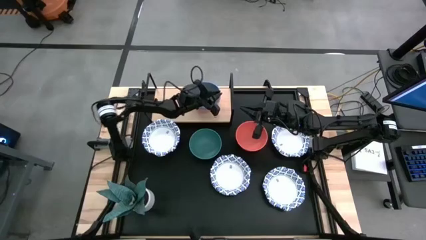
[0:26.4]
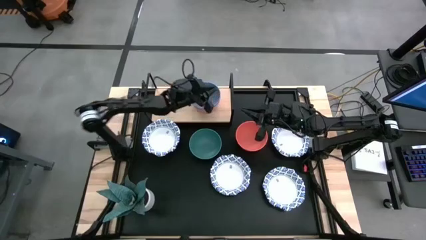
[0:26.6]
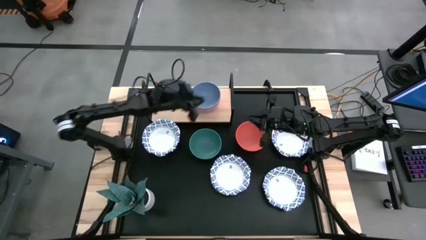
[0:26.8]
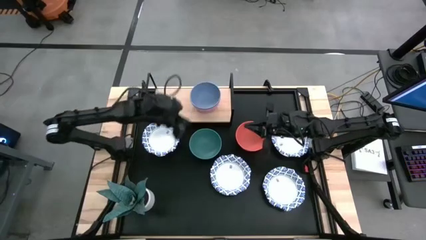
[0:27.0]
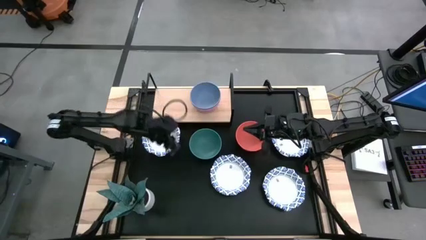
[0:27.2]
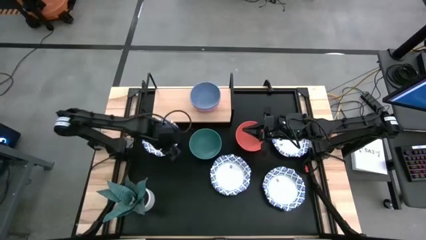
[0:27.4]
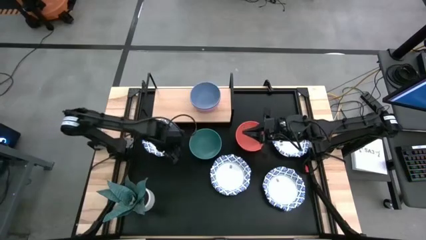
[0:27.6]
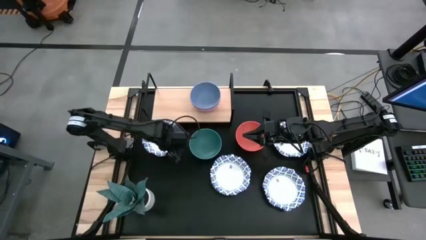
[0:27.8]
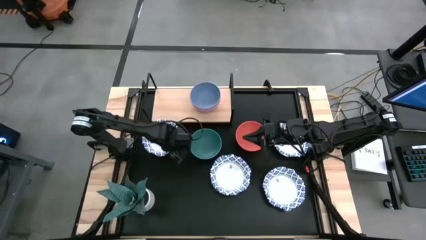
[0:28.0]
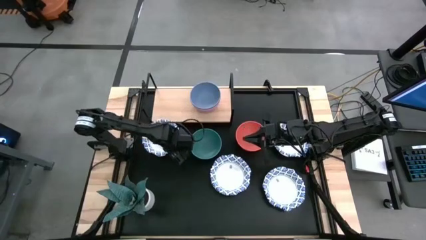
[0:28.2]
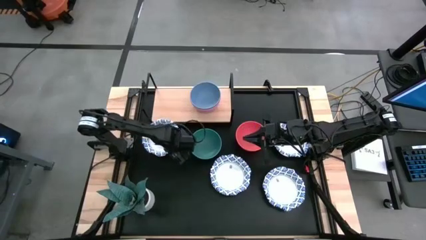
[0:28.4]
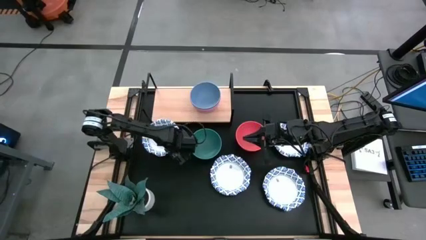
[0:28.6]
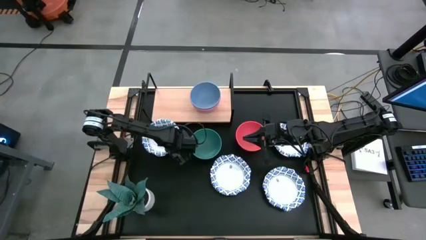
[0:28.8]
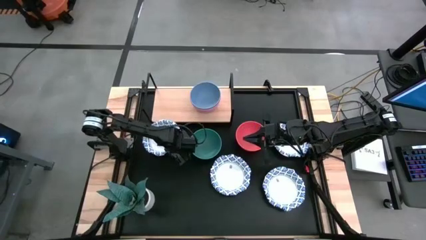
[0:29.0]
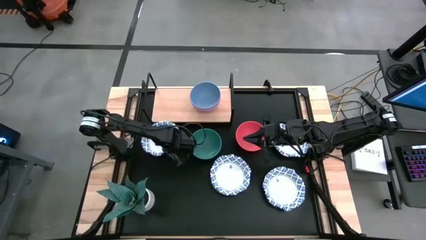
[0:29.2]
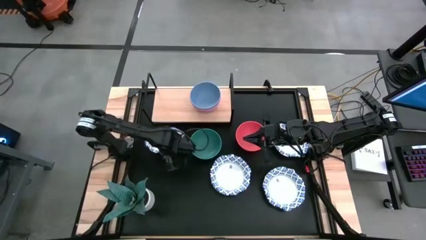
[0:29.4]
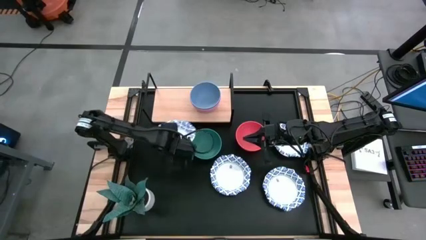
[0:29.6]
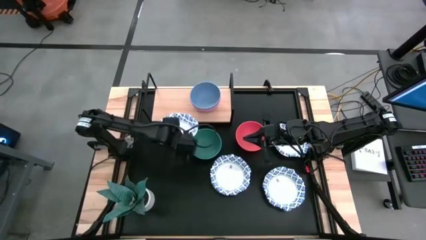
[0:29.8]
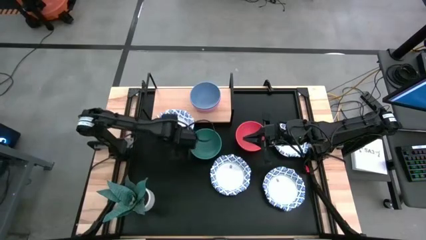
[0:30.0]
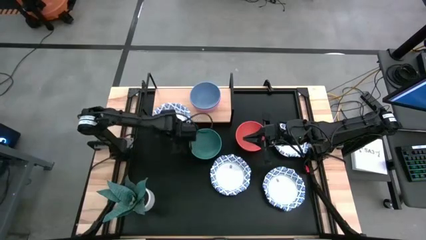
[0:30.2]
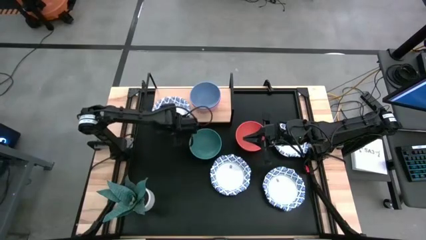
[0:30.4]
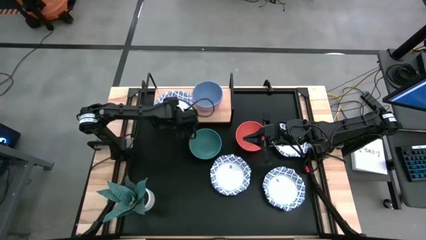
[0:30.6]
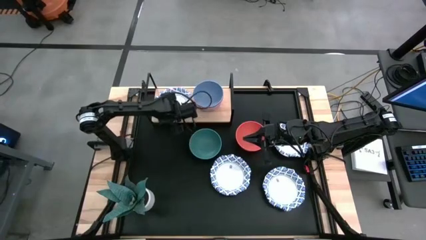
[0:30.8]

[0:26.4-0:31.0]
Task: Place and stack bowls onto a shelf
Put the white patterned bowl on the shelf

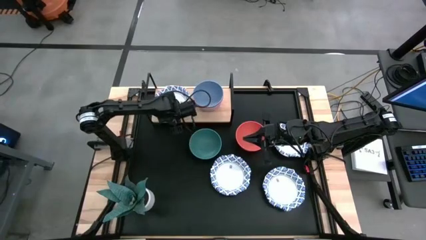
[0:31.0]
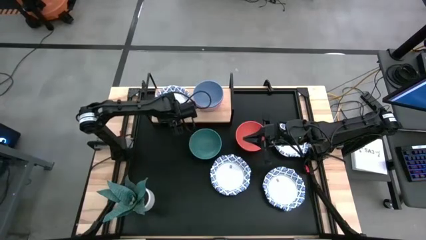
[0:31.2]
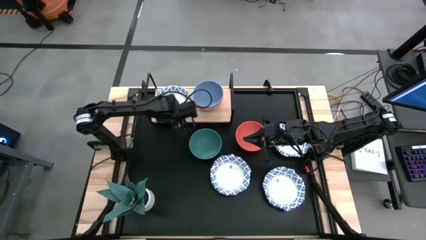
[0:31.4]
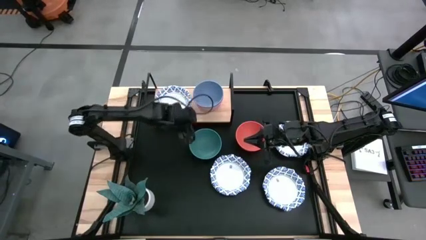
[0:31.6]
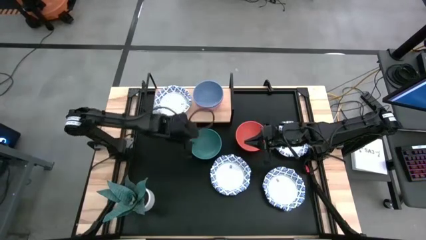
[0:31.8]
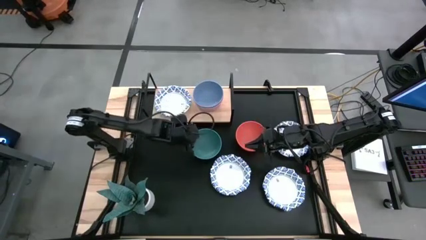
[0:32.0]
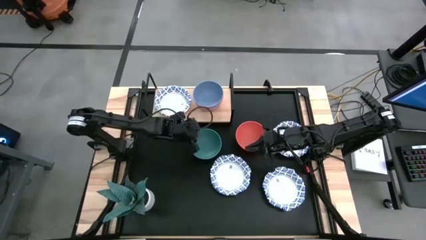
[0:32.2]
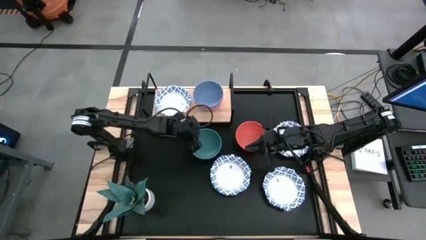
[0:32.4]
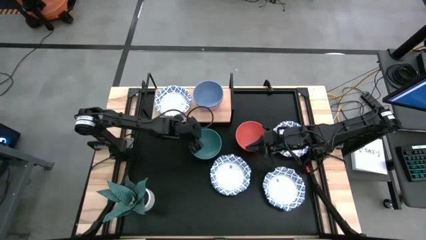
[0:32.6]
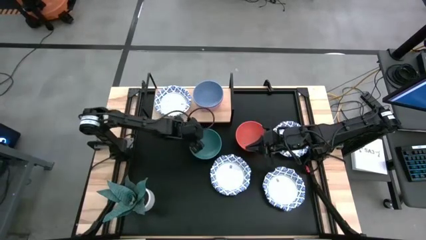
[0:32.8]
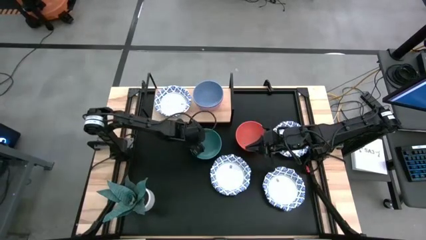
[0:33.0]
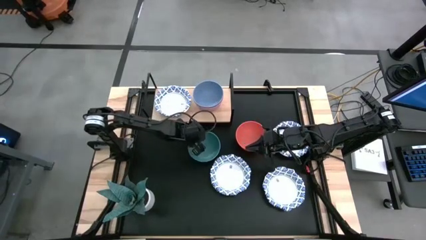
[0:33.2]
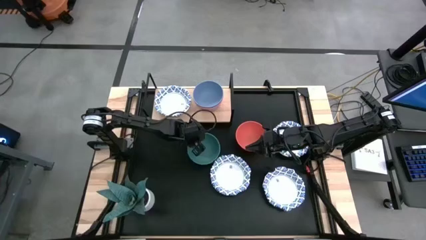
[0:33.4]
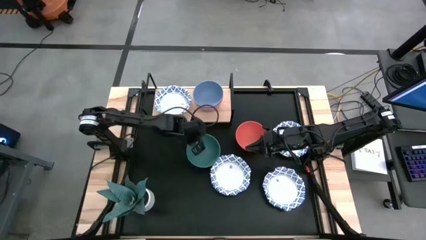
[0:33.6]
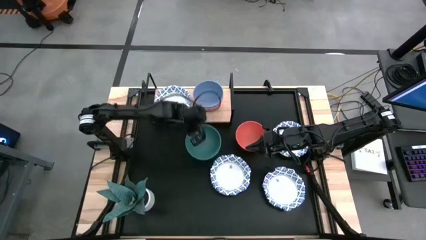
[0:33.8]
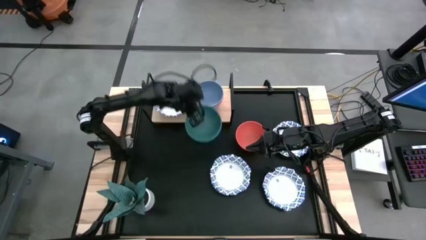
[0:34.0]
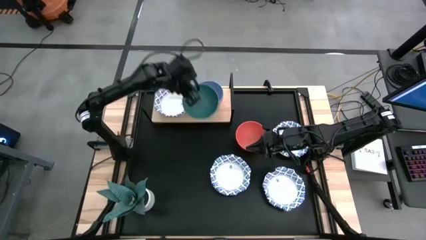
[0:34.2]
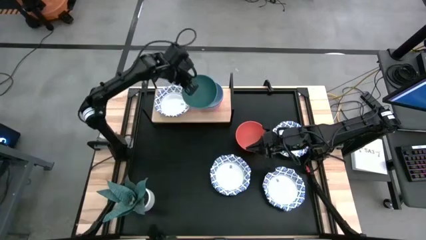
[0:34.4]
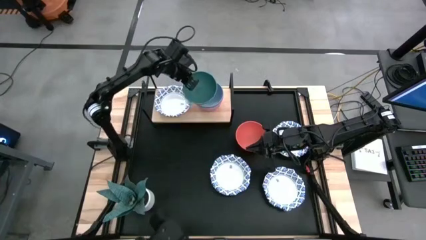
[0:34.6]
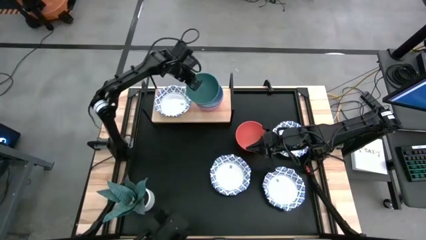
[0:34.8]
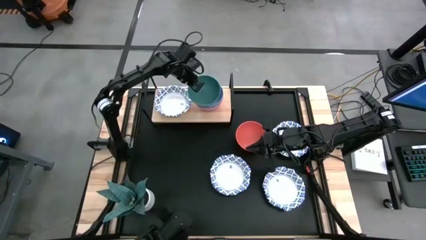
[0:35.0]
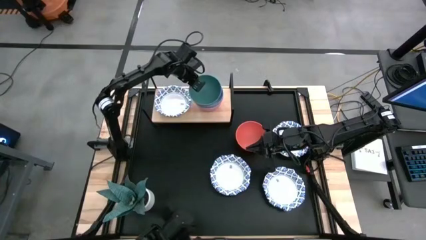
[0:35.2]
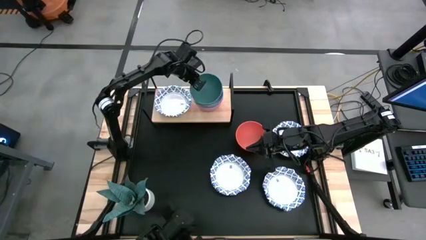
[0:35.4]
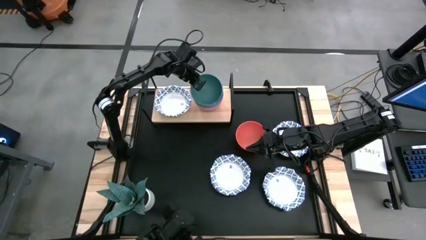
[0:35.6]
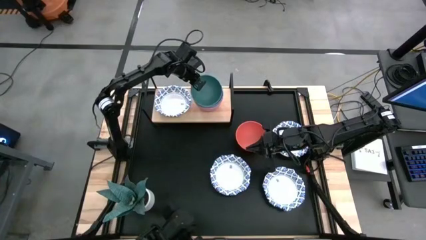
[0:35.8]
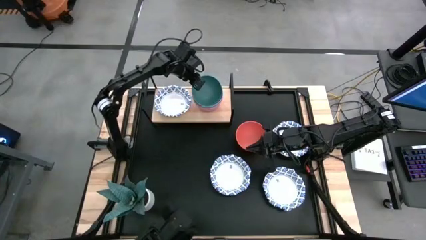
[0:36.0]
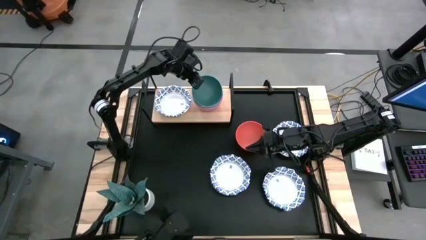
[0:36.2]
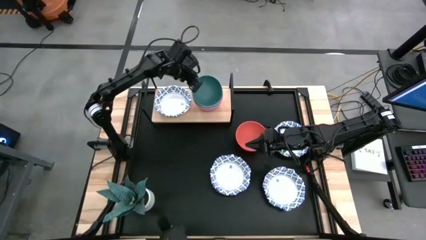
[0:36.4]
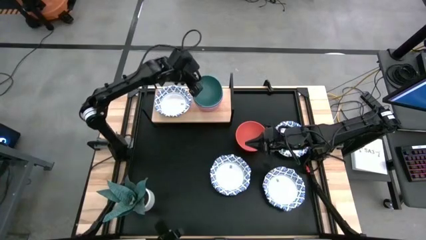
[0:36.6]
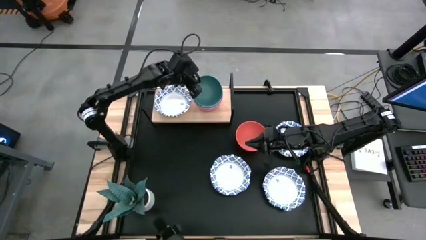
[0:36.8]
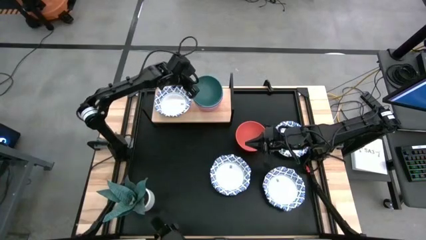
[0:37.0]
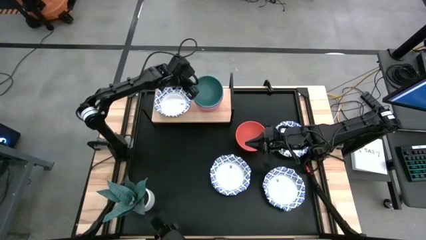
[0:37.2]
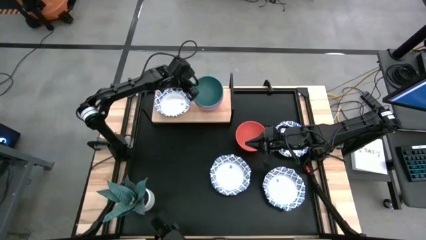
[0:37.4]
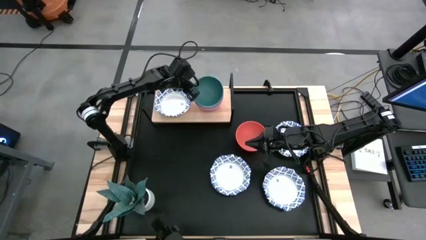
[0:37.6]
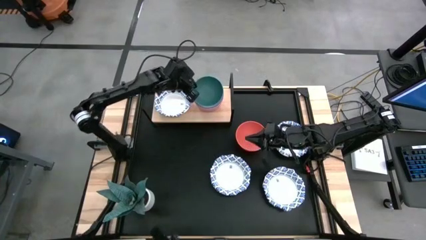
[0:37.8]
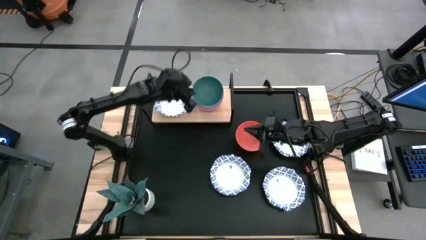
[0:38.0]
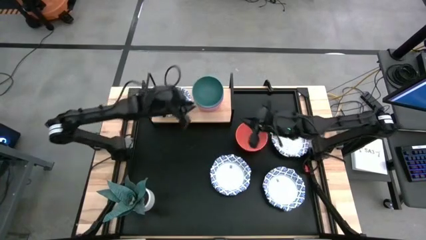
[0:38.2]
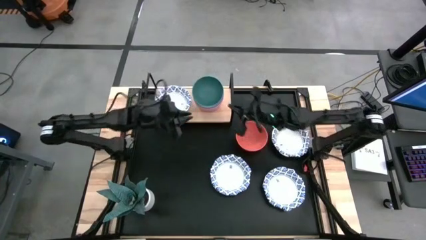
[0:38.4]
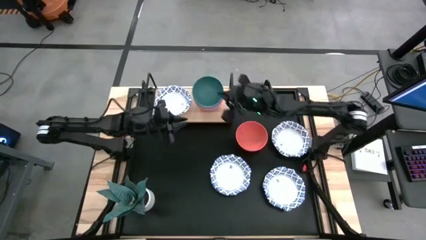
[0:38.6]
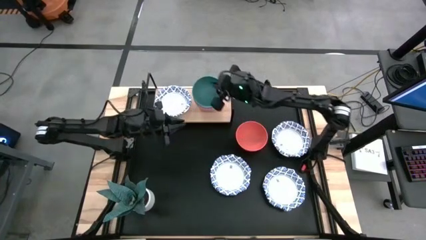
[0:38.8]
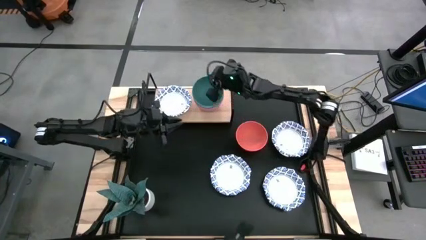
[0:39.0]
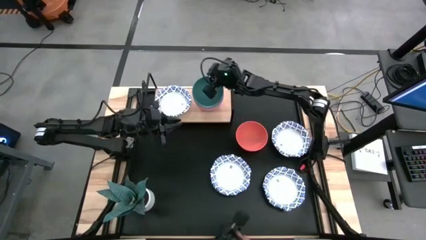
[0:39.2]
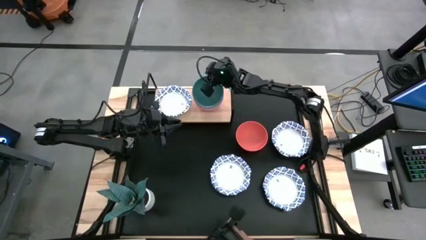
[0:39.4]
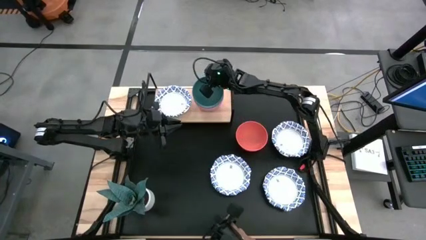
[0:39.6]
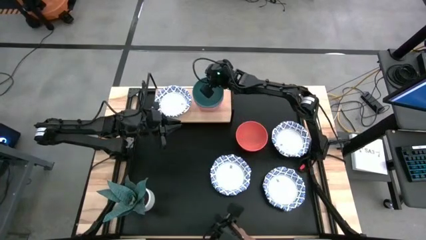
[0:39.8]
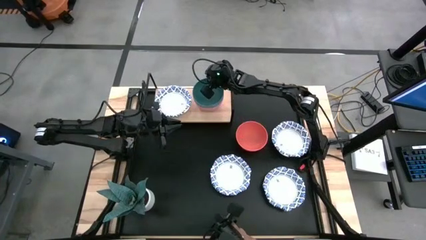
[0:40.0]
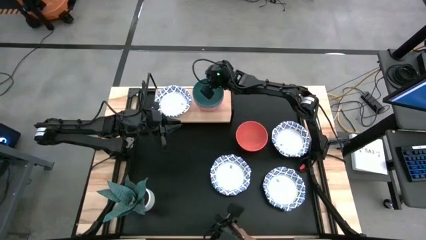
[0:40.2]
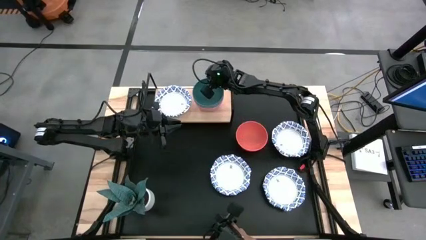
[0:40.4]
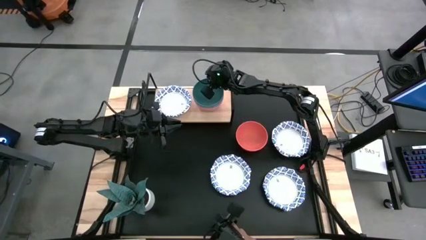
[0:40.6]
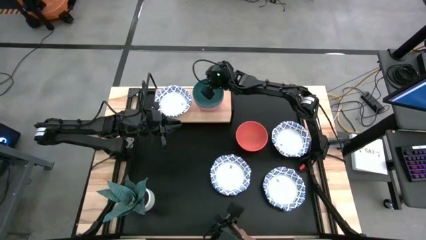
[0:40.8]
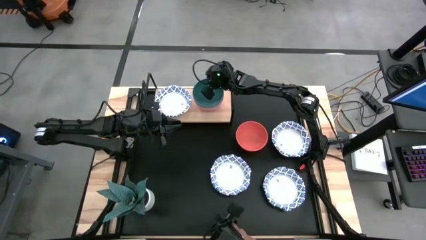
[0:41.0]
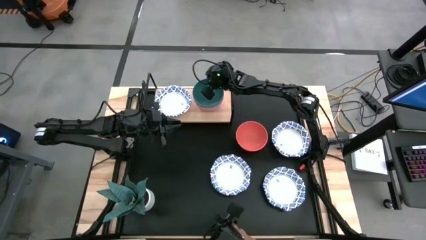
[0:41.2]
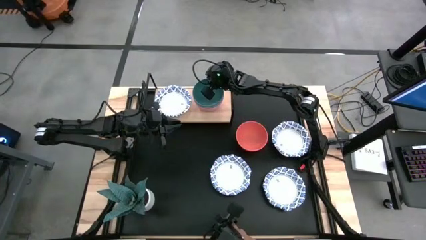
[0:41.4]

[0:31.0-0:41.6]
Stack the green bowl on top of the blue bowl

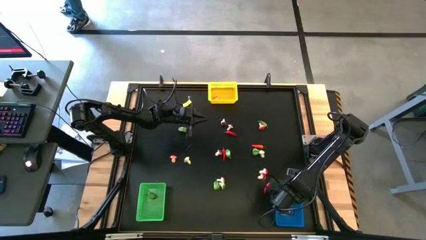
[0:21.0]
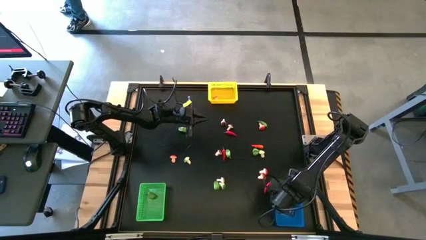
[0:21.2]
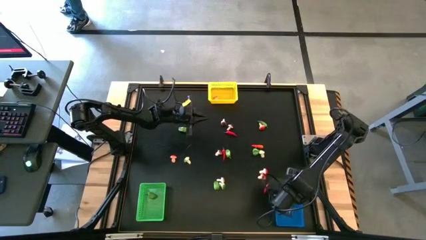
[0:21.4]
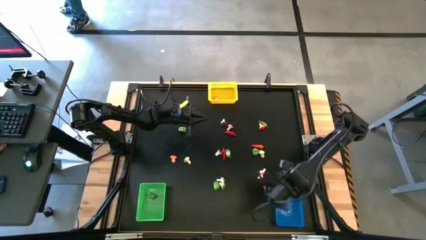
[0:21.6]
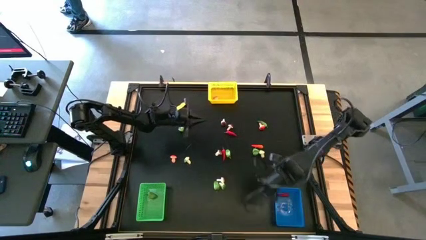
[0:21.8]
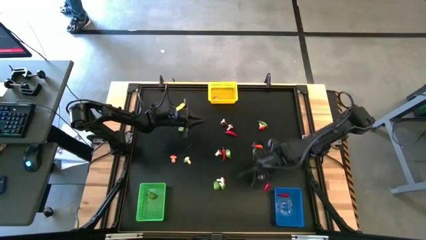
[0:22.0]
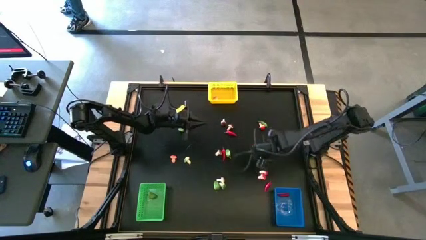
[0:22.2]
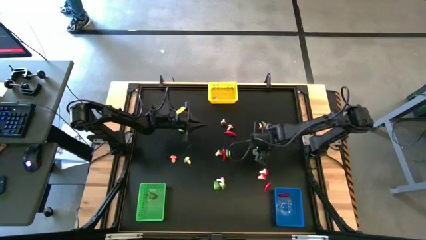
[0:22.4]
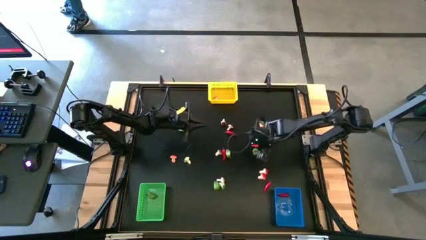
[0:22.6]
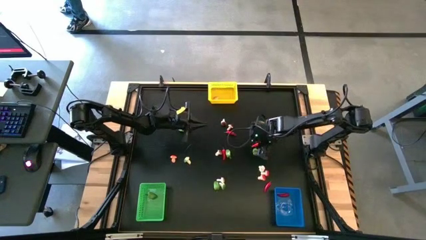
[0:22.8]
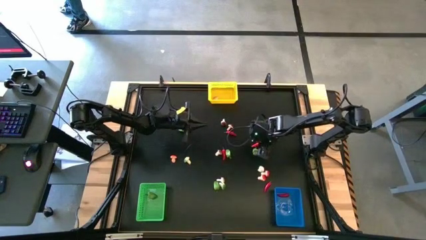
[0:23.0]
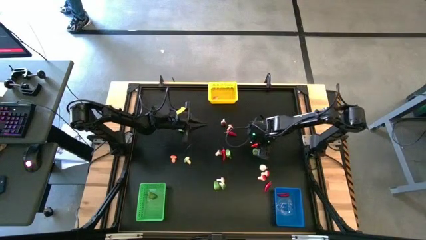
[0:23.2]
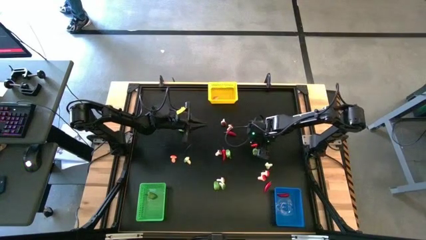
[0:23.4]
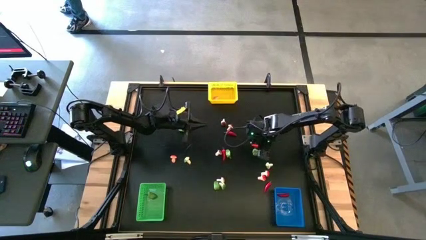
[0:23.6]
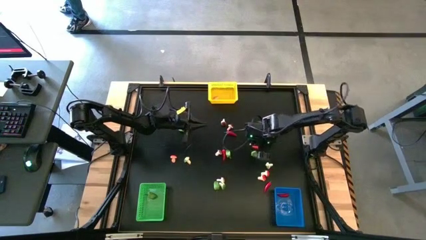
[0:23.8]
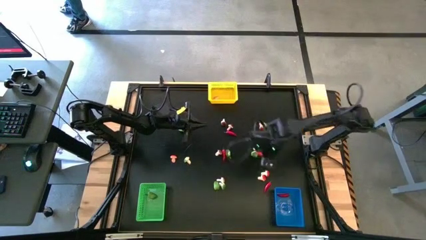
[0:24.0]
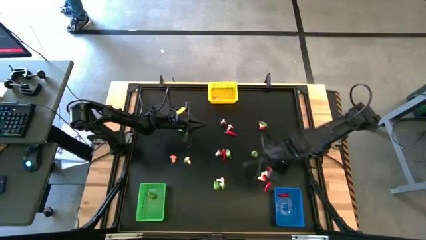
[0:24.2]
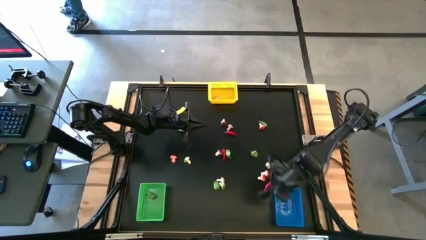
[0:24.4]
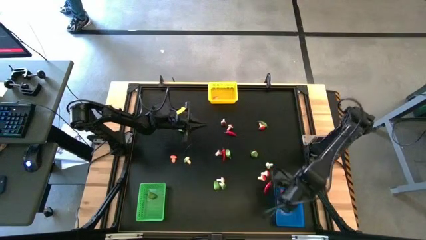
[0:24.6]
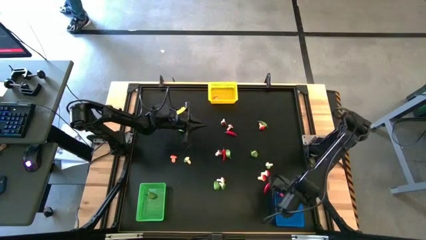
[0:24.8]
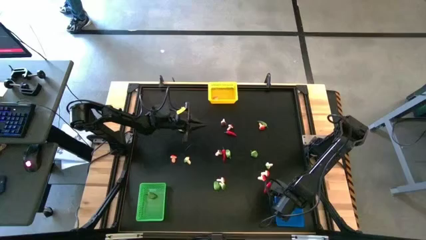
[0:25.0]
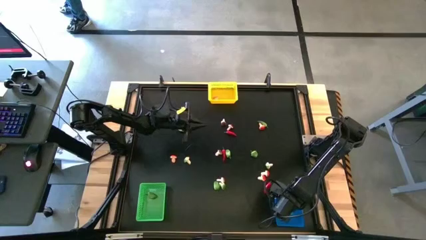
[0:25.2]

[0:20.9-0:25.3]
Task: Sort produce into baskets
Put the middle right orange chili into the blue bin
